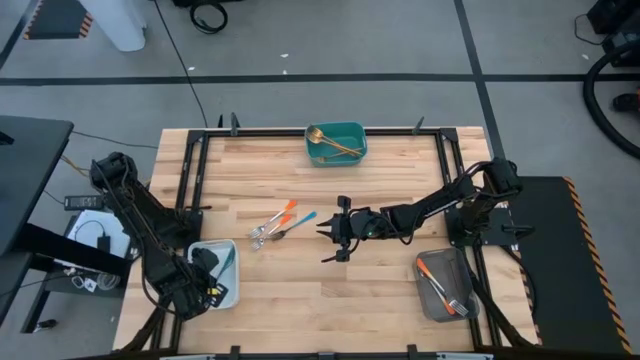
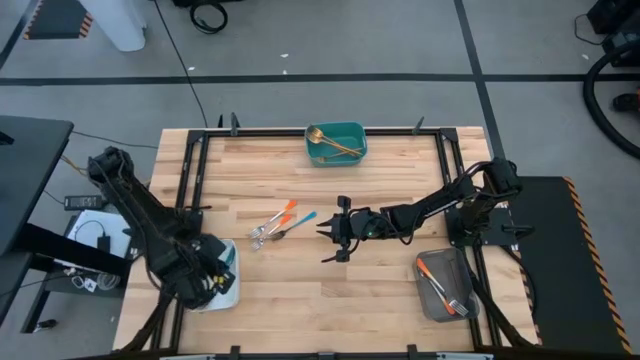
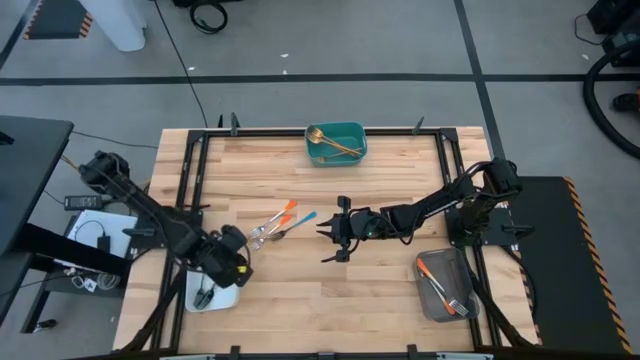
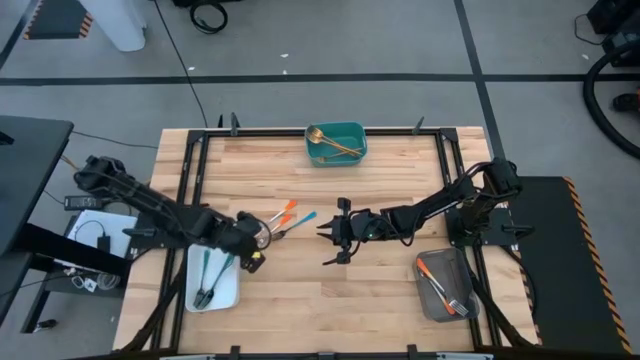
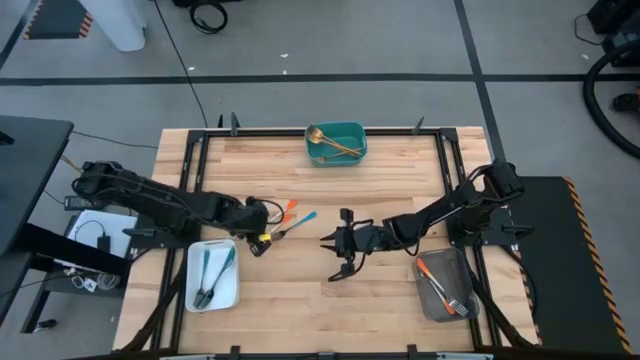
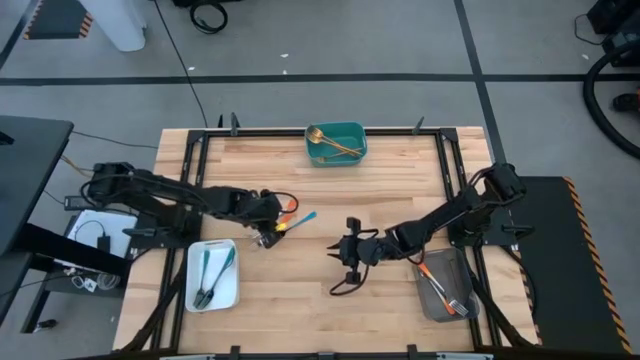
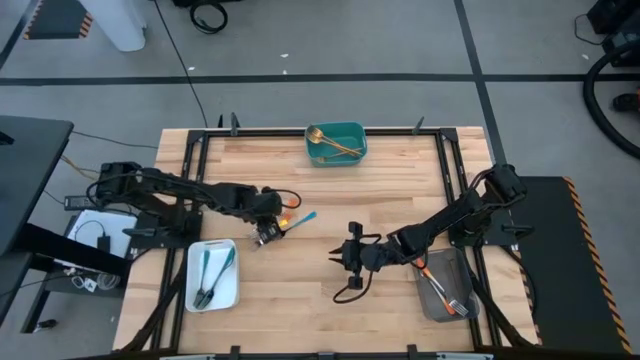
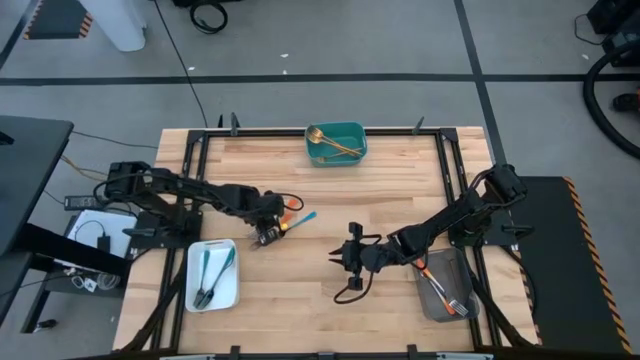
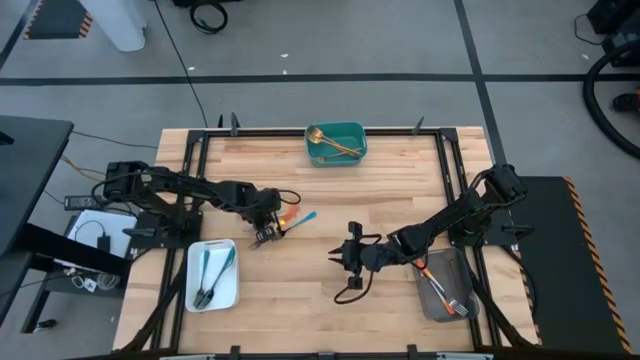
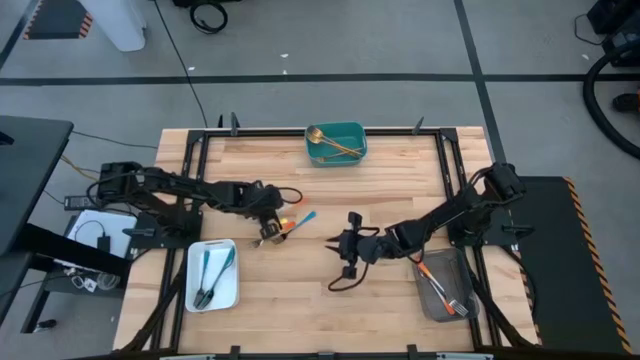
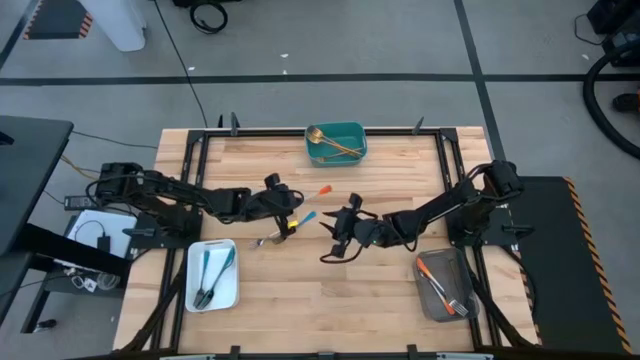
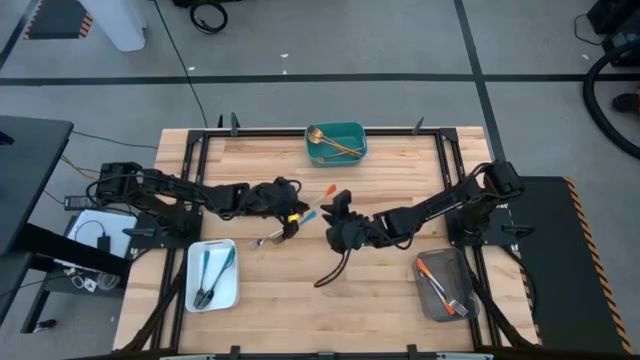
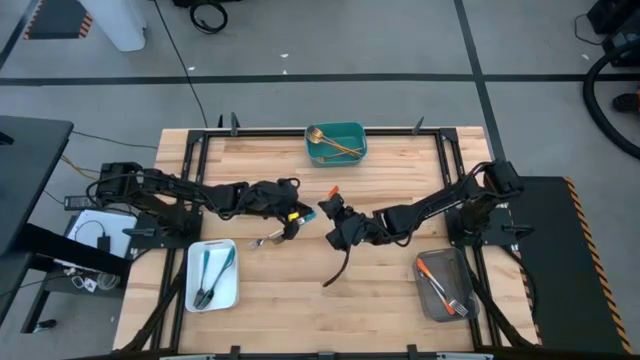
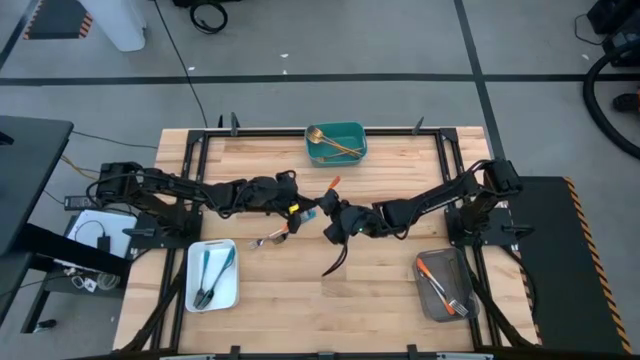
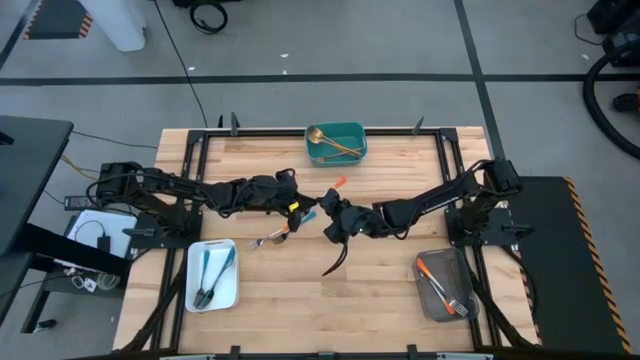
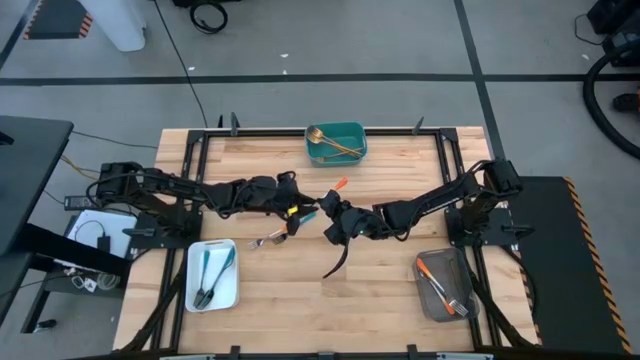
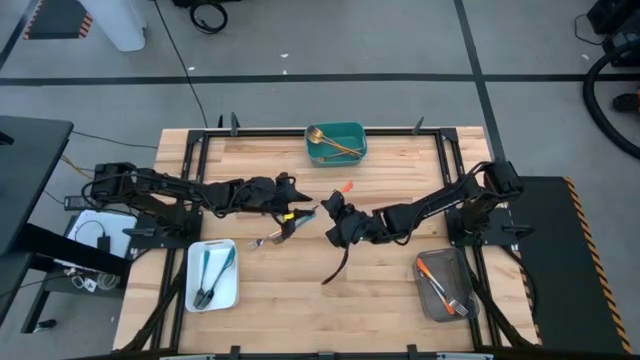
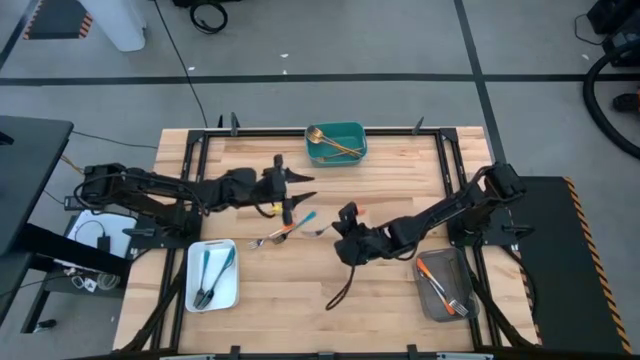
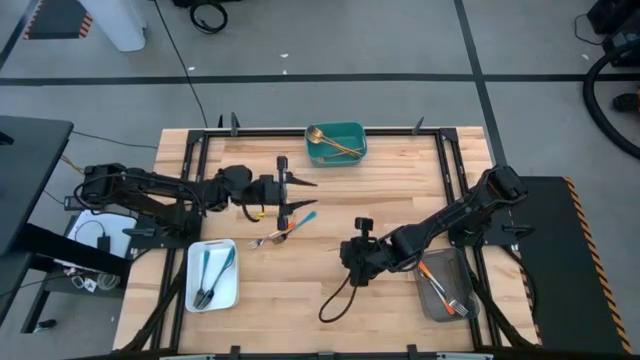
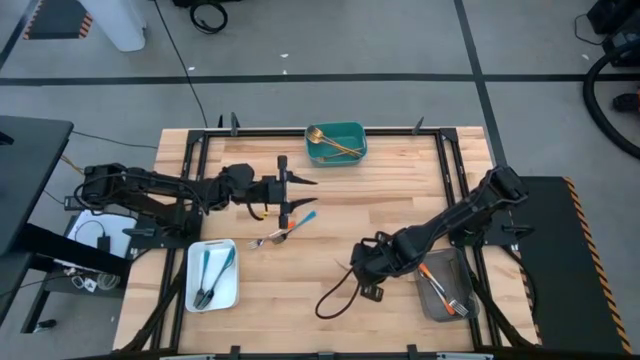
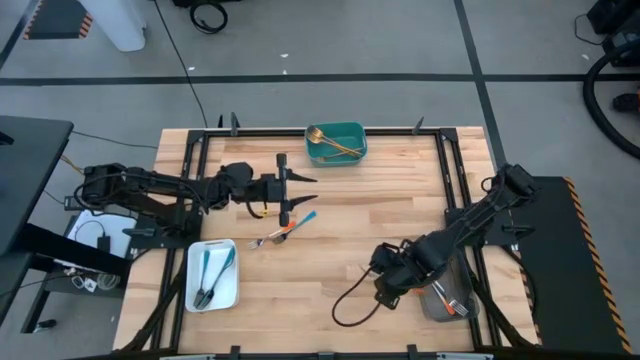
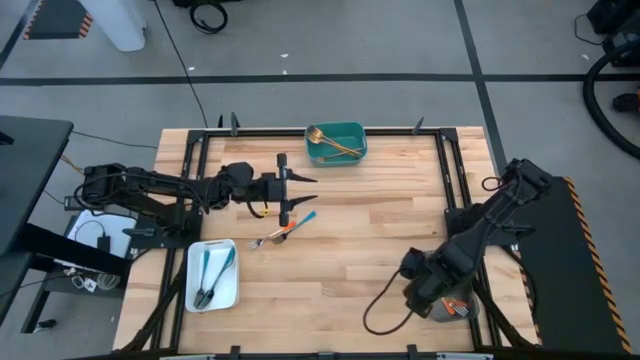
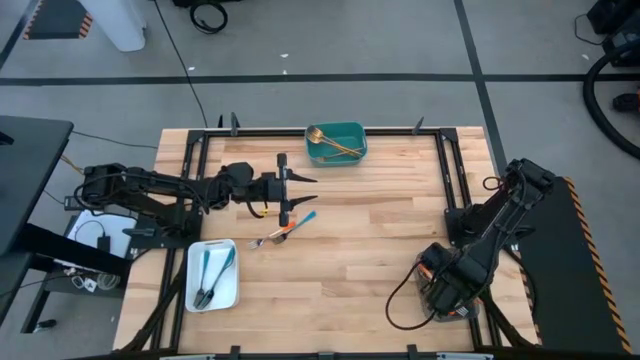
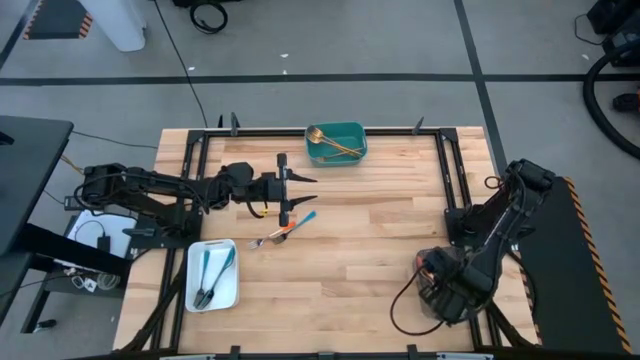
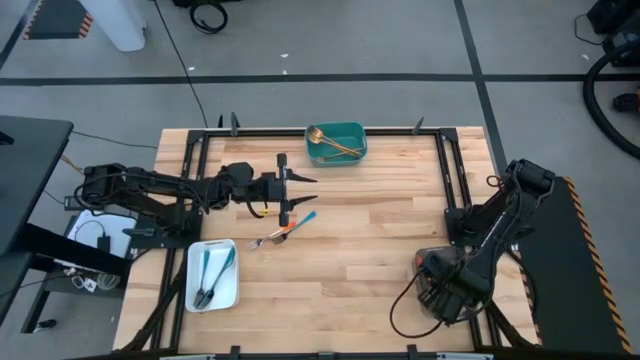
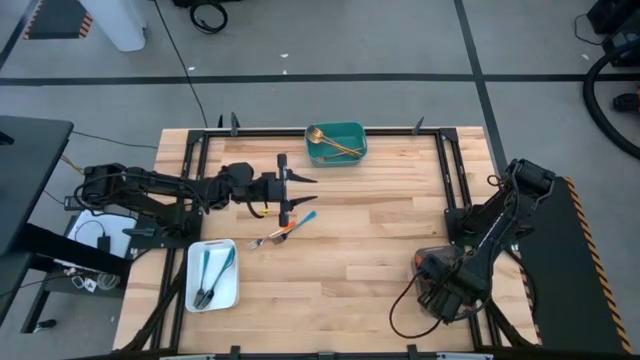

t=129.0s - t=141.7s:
Task: Sort silverware by color (type)
Put the left orange fork into the gray bin

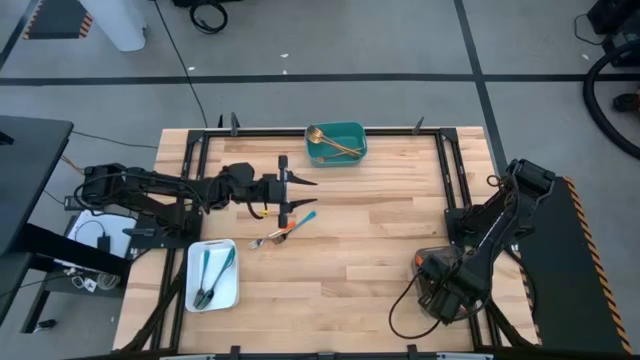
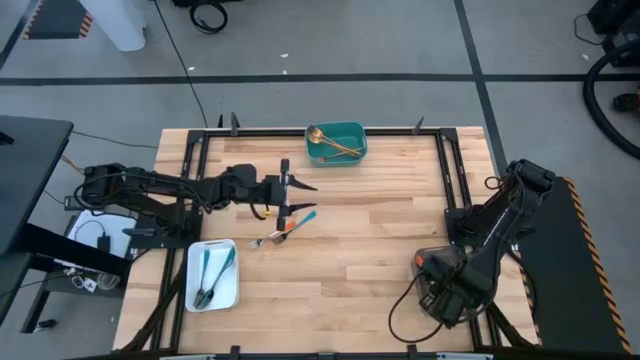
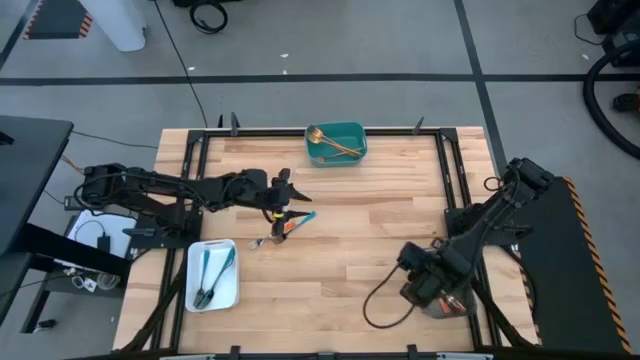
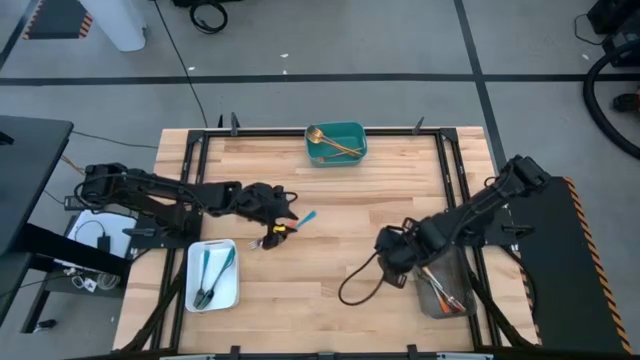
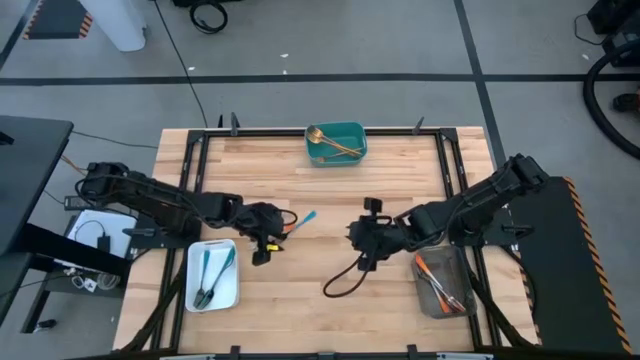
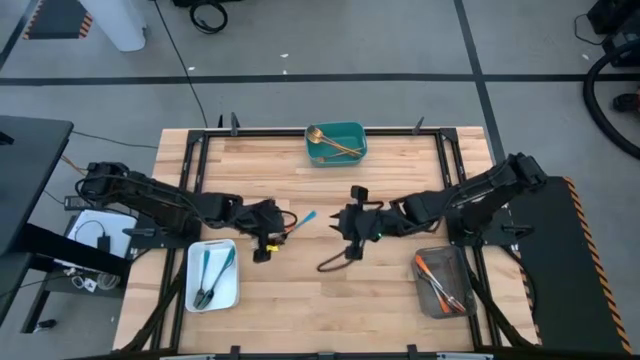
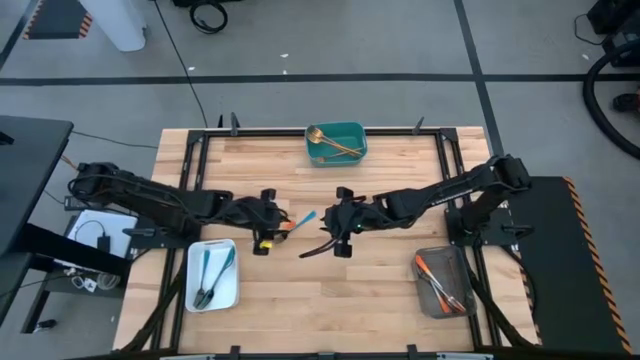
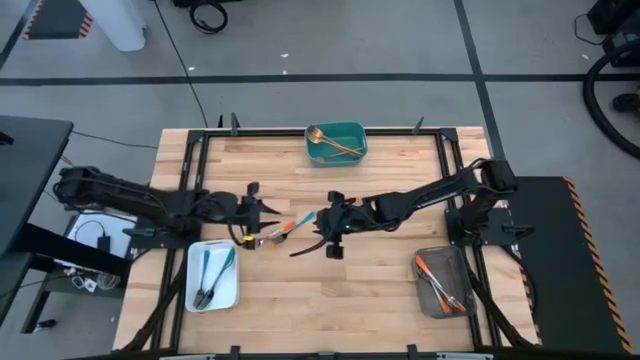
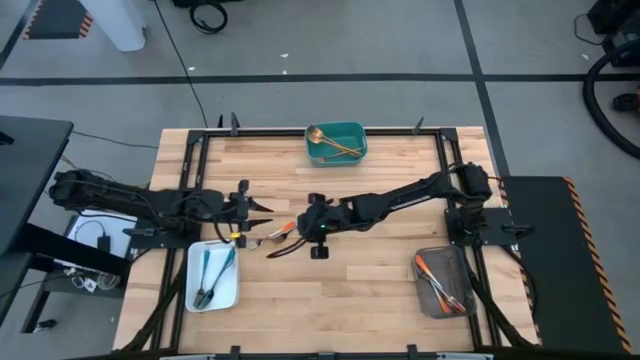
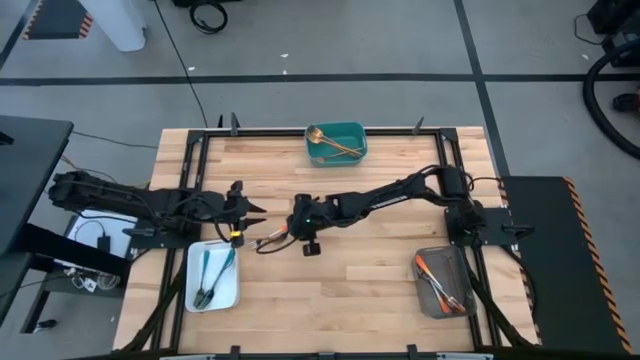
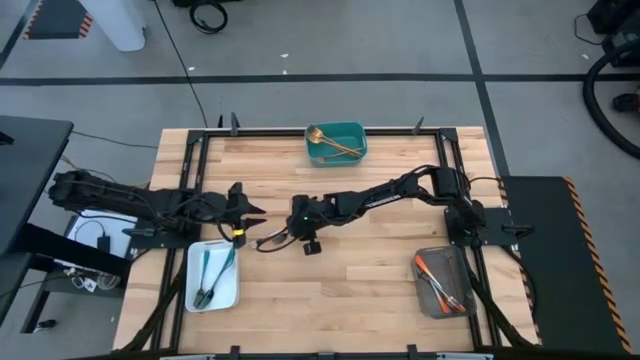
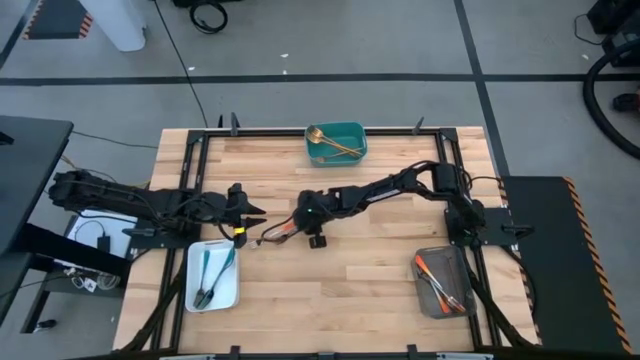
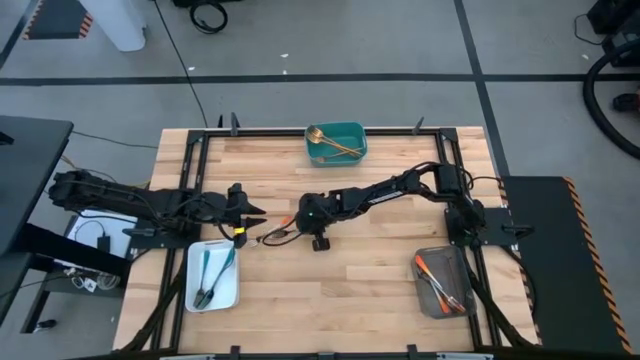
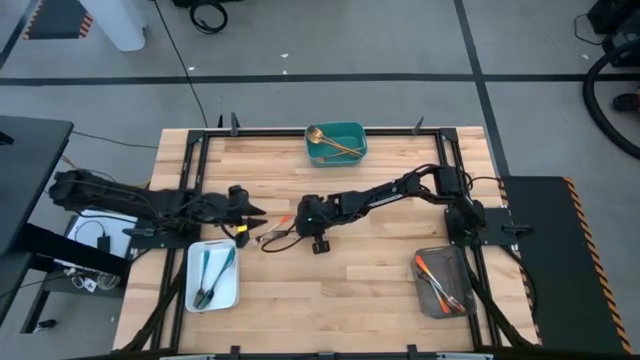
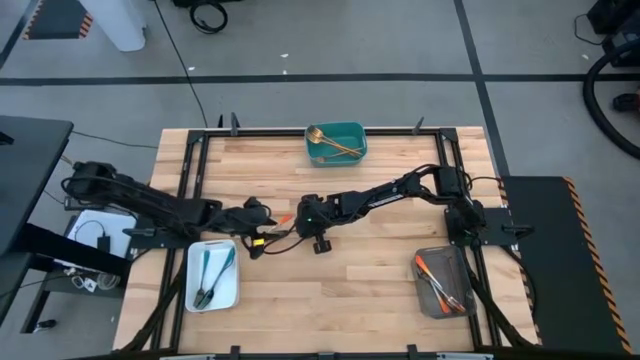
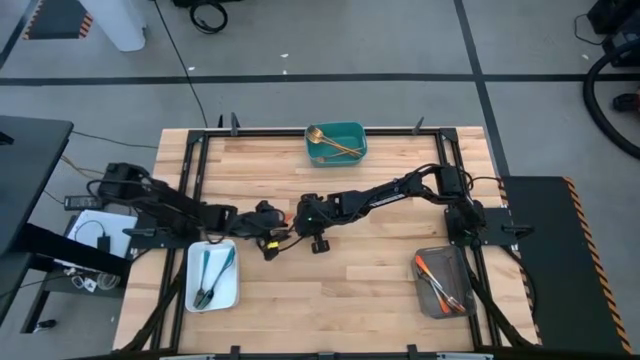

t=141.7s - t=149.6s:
Put the blue fork into the white bin

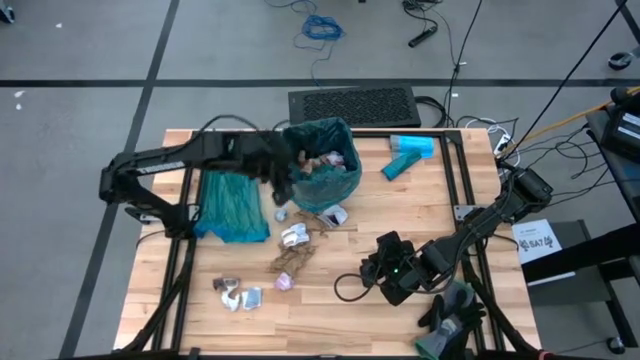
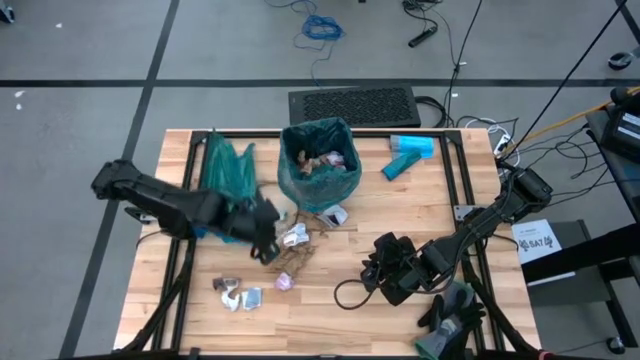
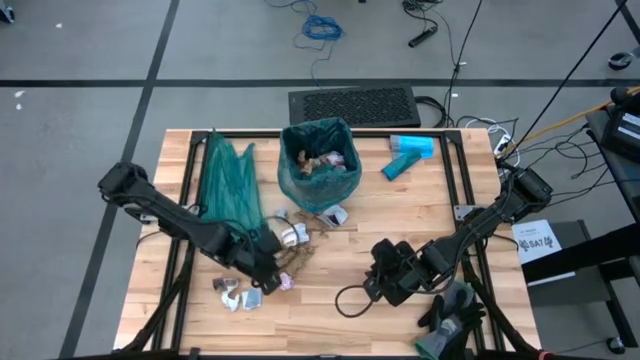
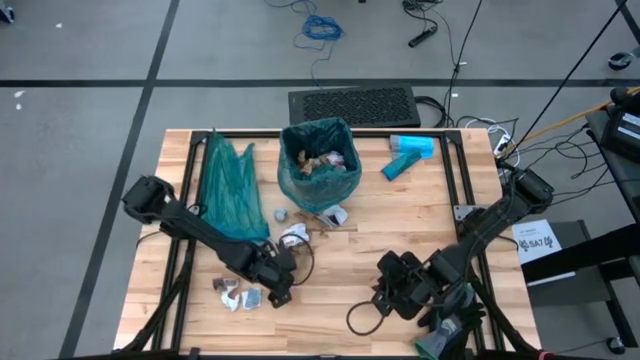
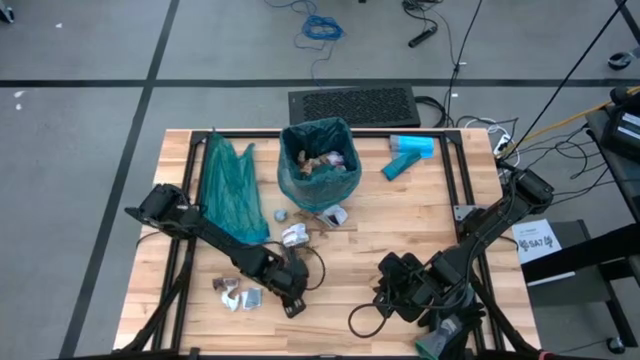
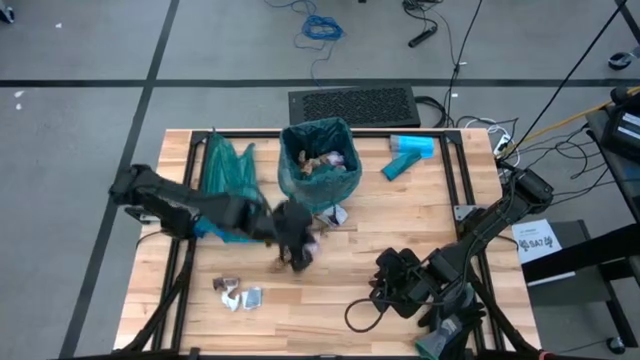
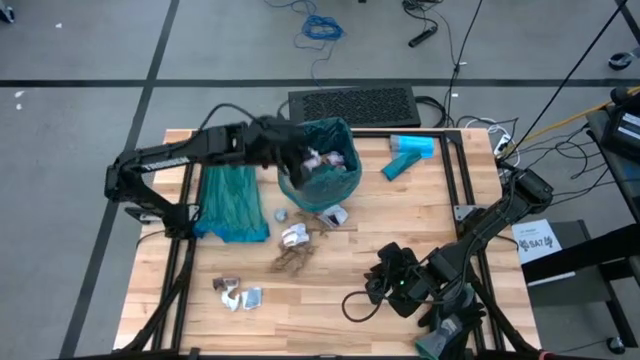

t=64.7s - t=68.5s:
Task: place trash/remove bag and relplace
Put the pink plastic into the blue trash bag inside the black trash bin
